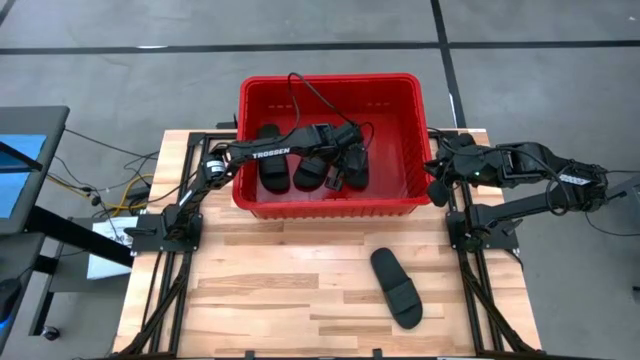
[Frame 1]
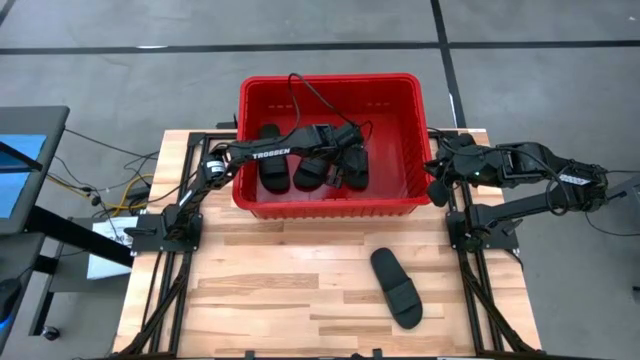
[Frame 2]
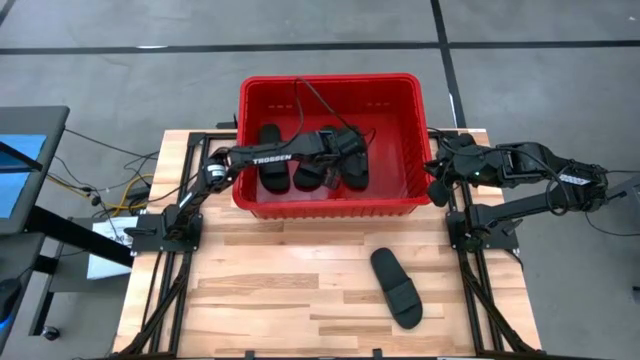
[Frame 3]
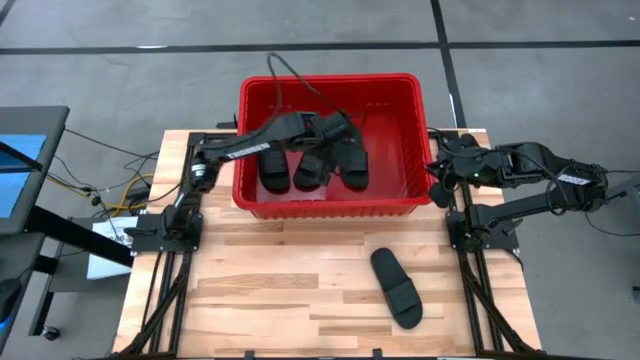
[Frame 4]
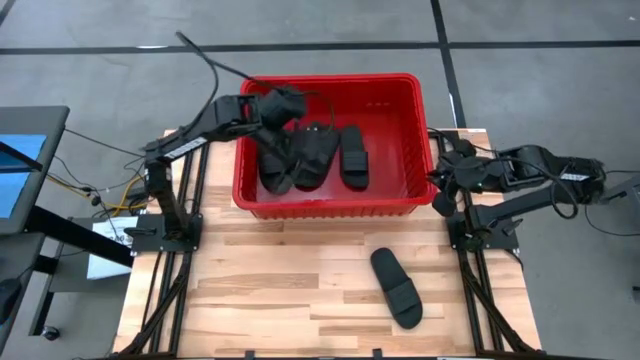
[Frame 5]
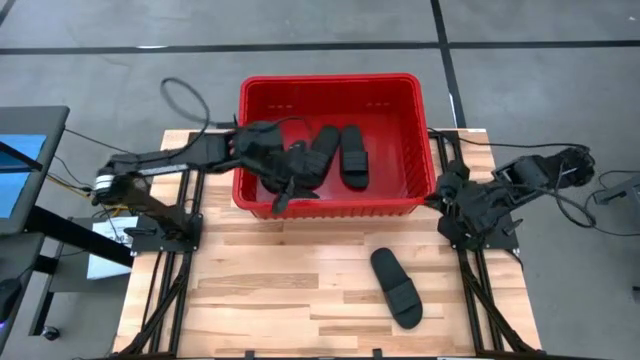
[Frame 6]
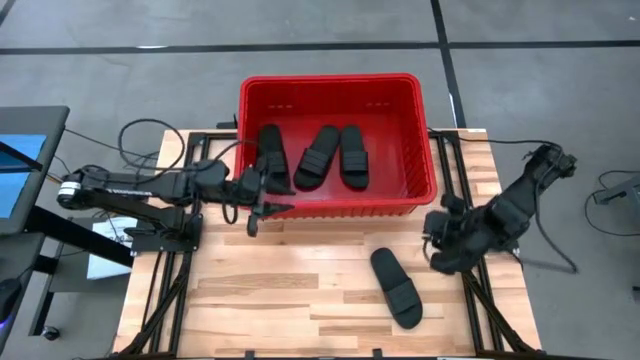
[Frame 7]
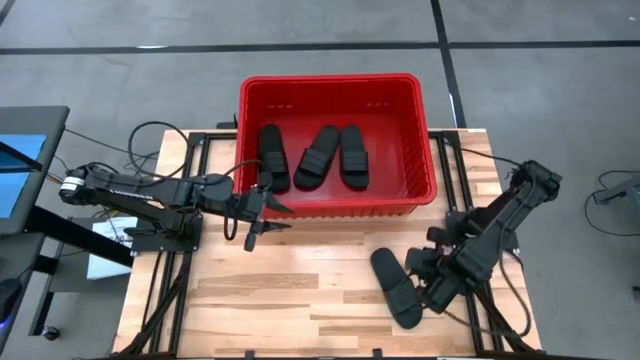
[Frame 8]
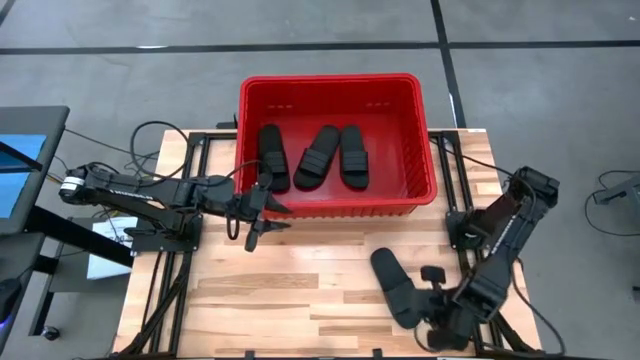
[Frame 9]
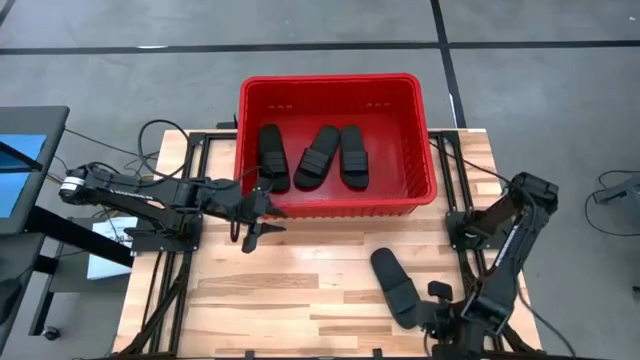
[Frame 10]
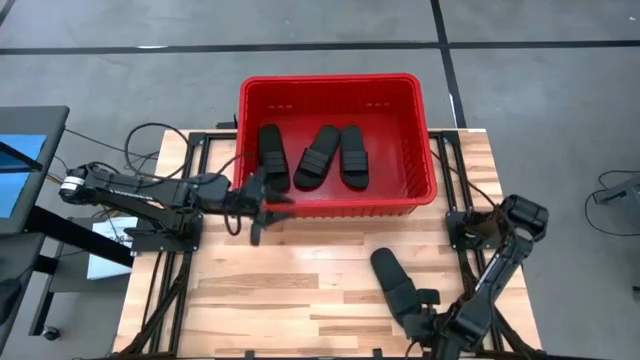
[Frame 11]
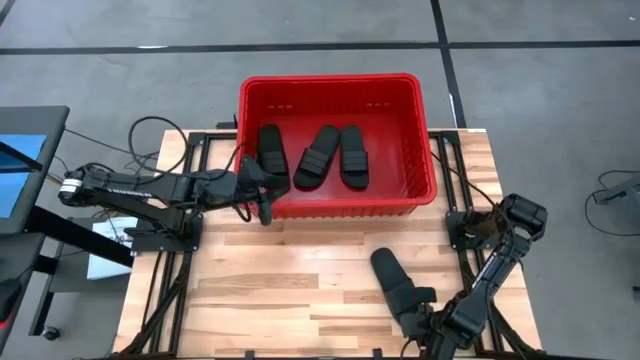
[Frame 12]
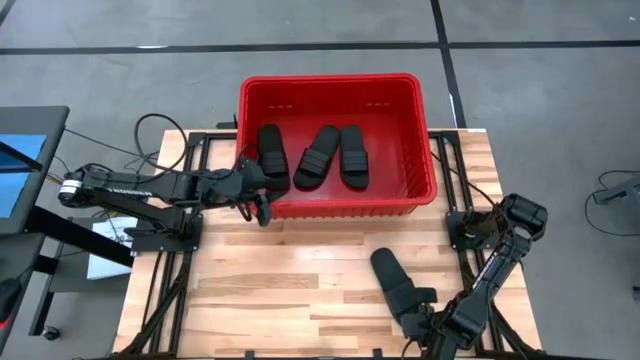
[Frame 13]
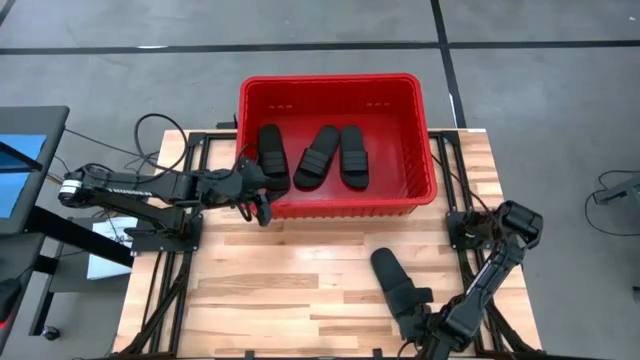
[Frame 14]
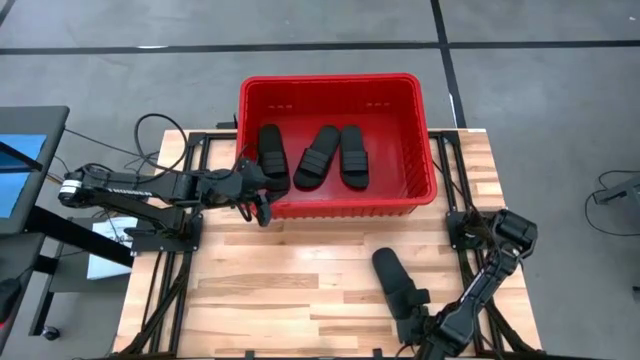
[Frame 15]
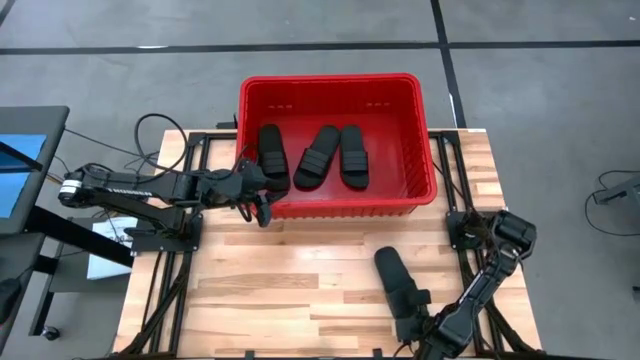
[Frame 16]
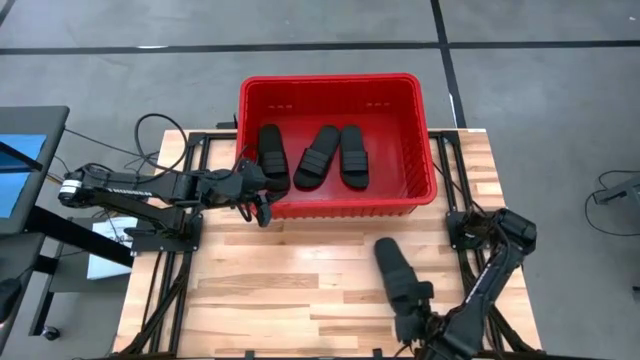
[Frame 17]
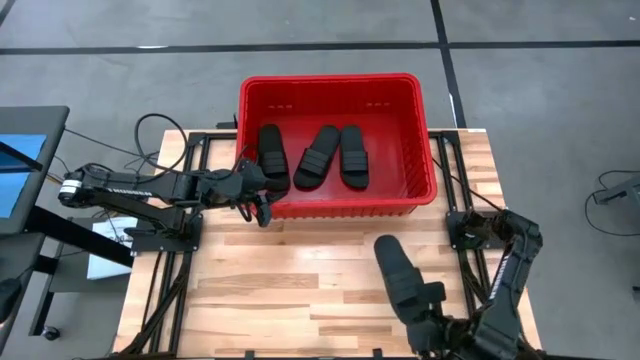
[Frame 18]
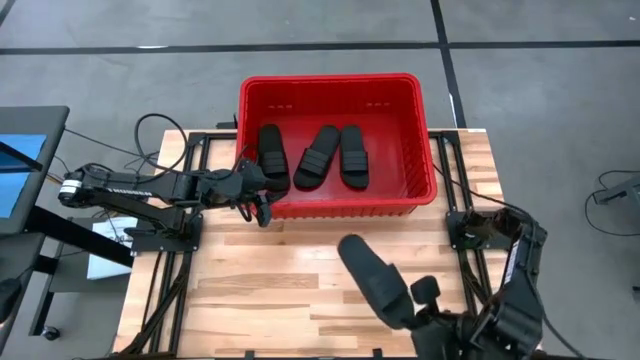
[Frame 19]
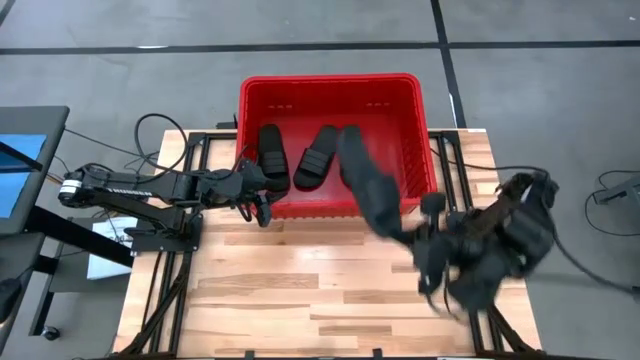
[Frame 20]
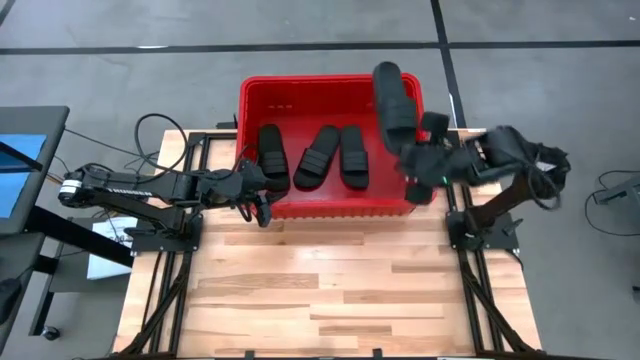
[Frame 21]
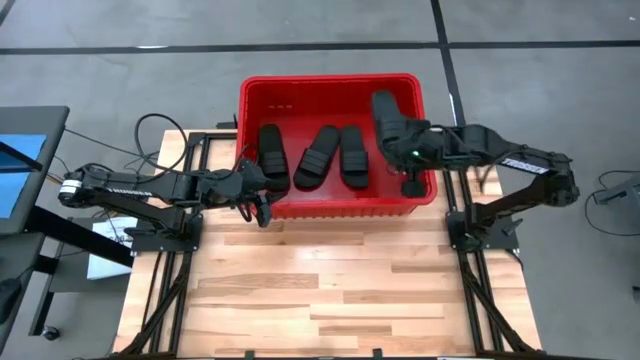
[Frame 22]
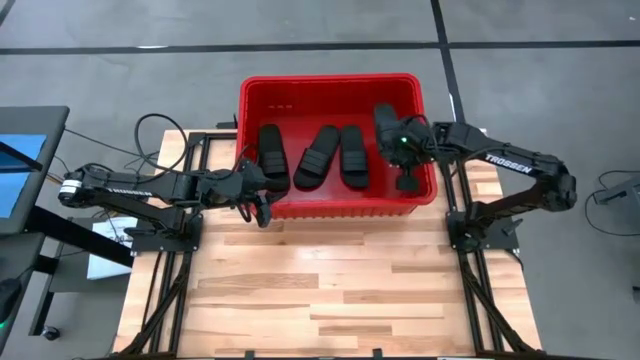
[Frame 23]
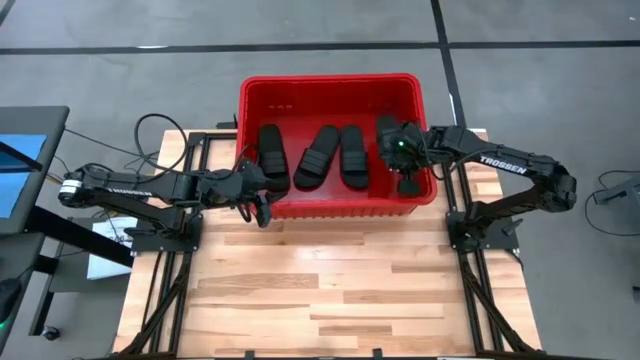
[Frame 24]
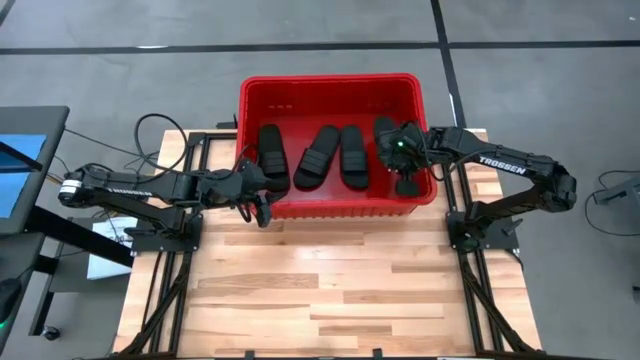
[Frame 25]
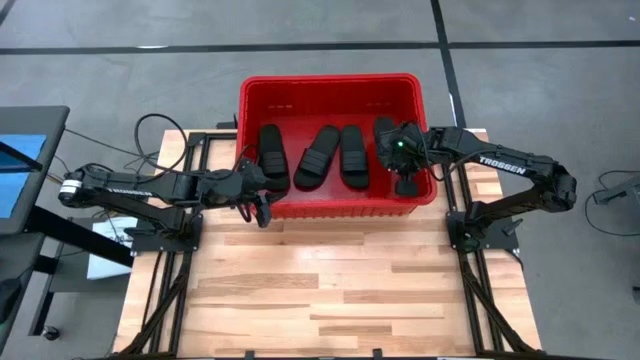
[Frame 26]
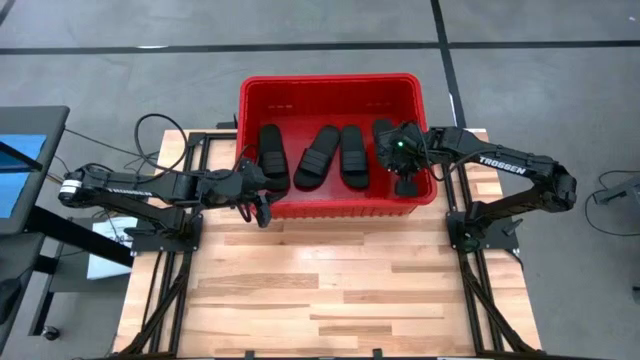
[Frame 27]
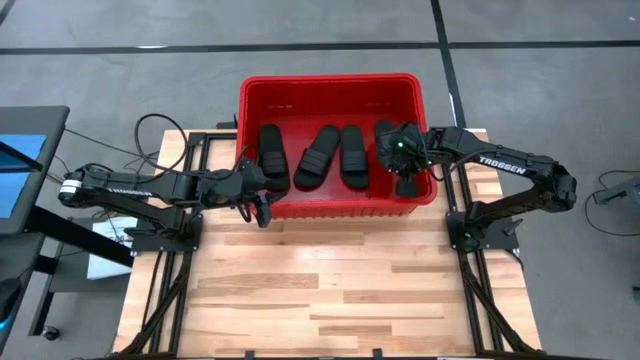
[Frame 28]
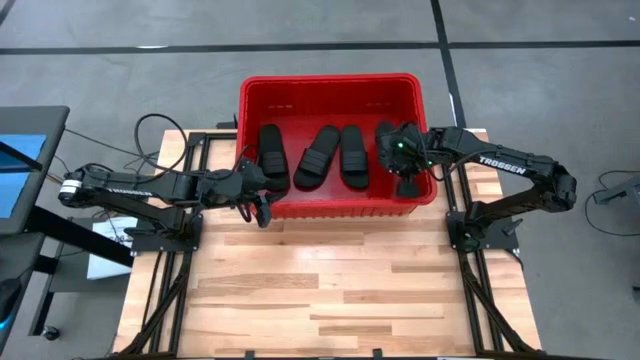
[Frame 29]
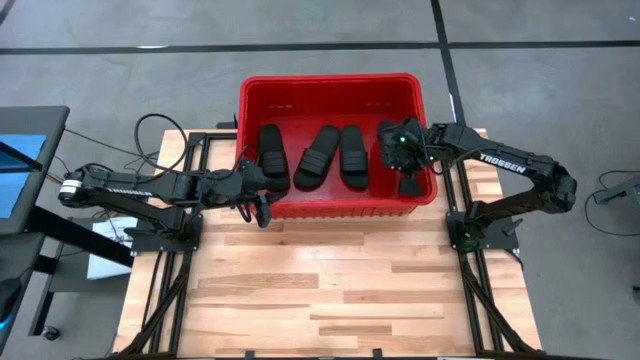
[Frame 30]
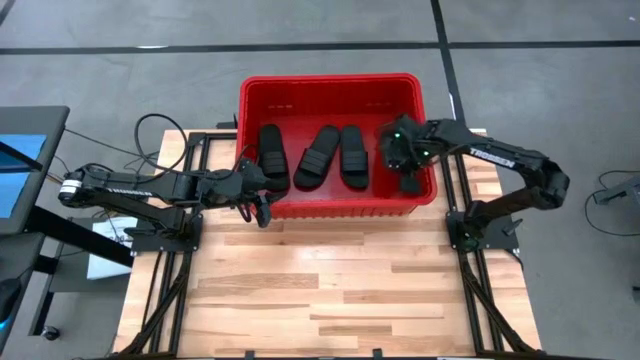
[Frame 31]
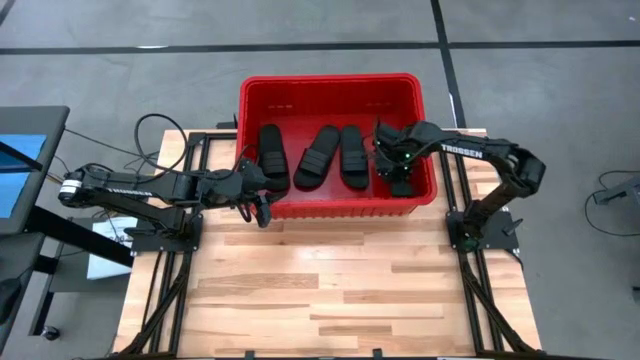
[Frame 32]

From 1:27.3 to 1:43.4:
Task: Pick and place slides into bin
Put the black slipper into the red bin

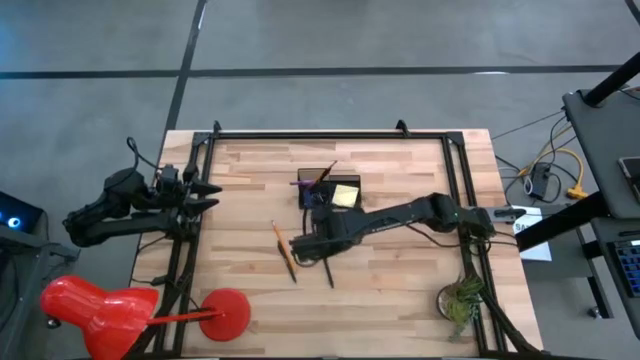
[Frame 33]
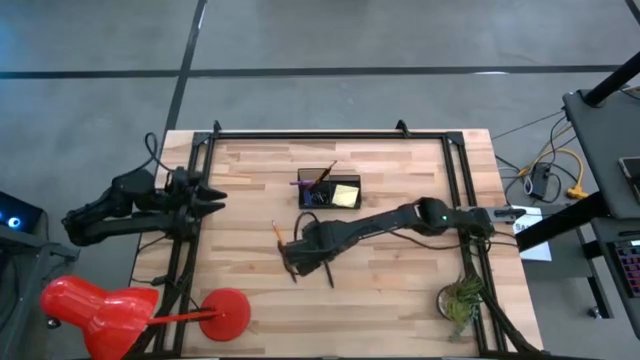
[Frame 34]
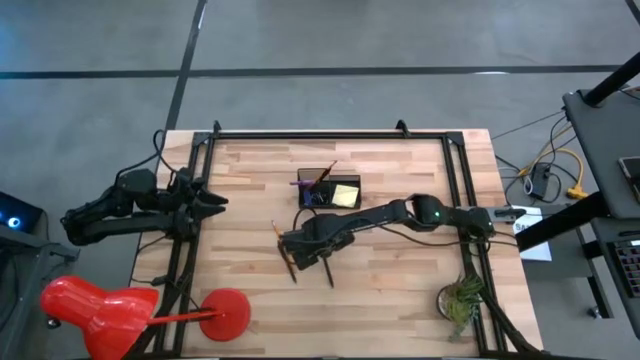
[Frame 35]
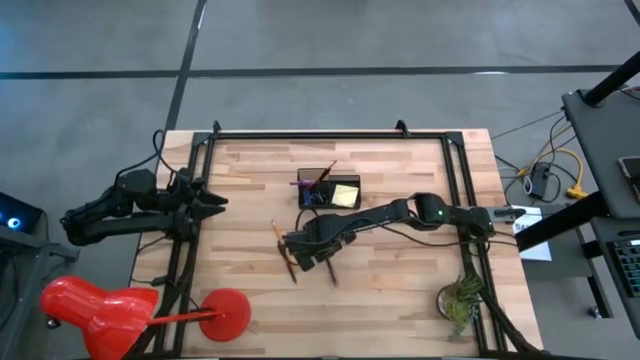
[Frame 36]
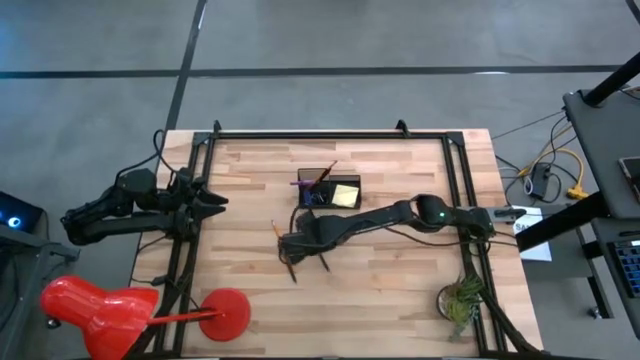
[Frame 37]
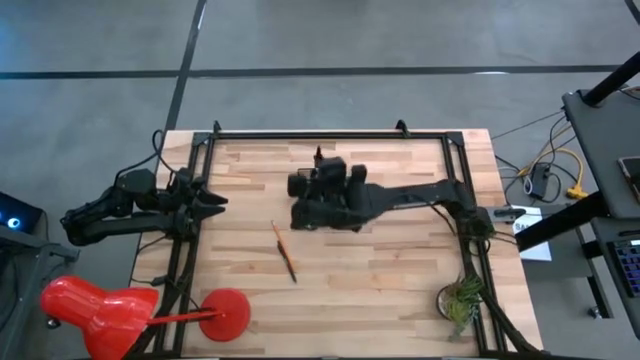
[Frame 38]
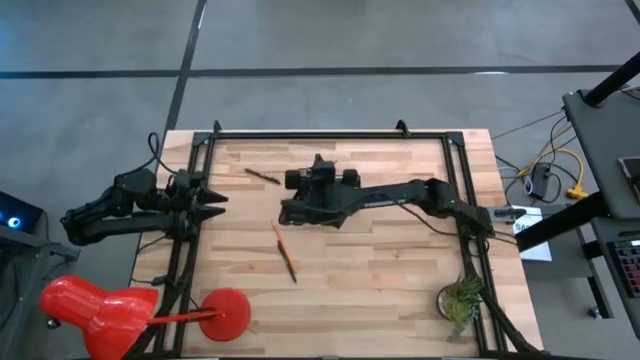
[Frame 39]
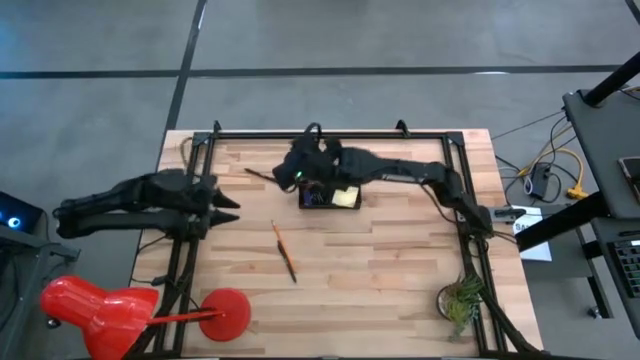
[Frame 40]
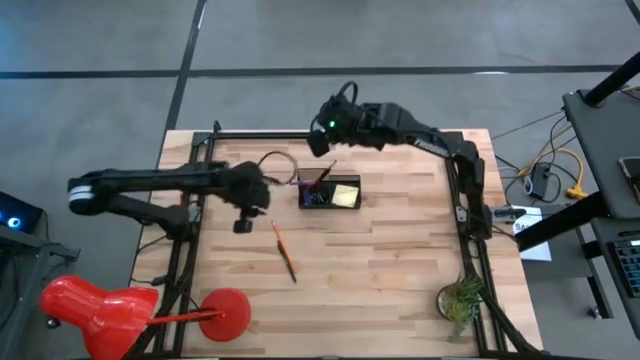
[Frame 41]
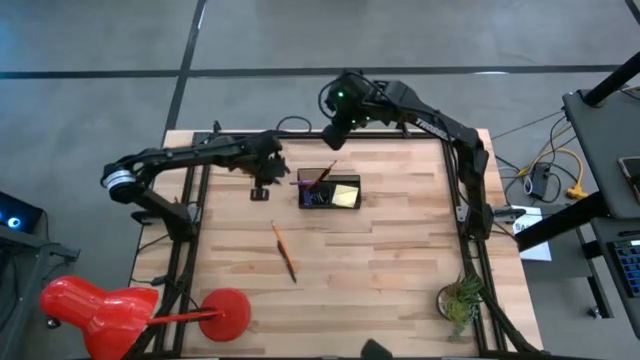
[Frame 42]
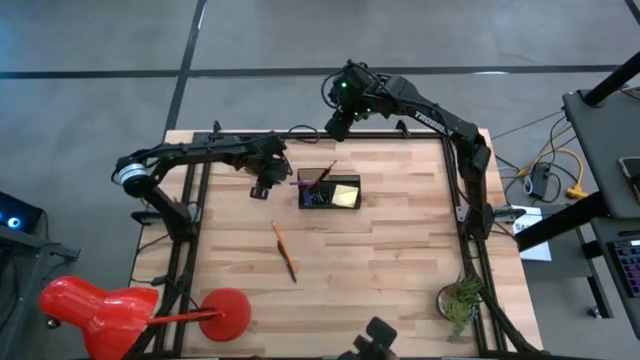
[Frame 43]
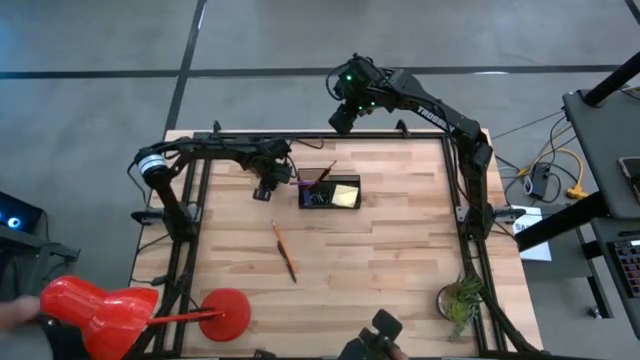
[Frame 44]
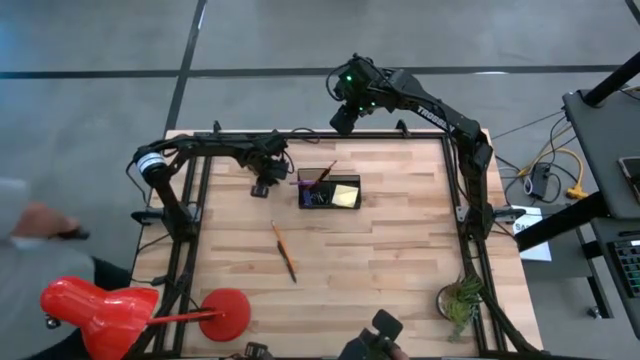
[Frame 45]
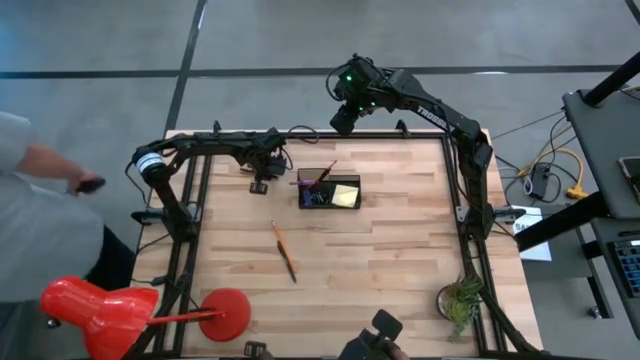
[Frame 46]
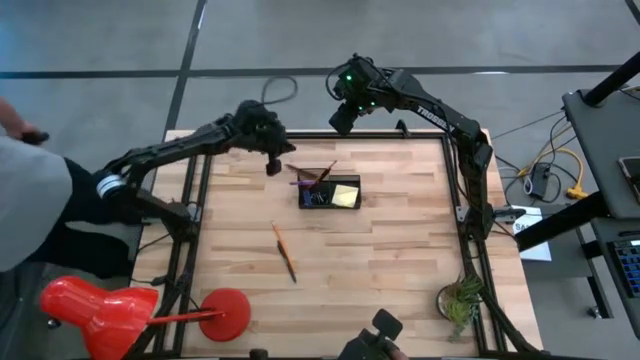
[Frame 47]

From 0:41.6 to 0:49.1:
Task: Pick and place office supplies into organizer
Put the center black pen into the black desk organizer
